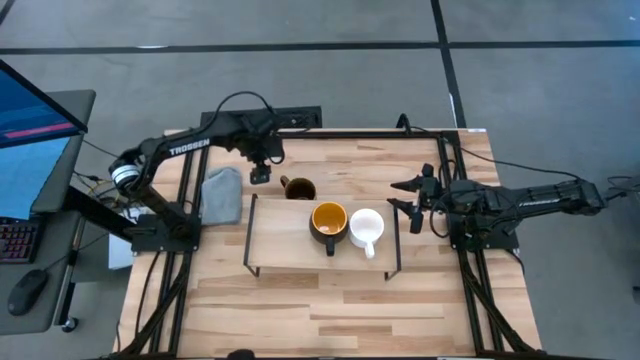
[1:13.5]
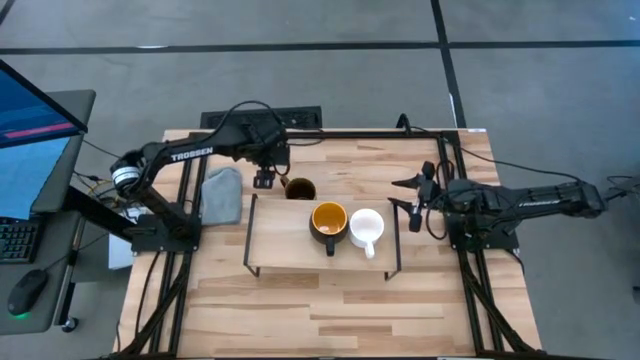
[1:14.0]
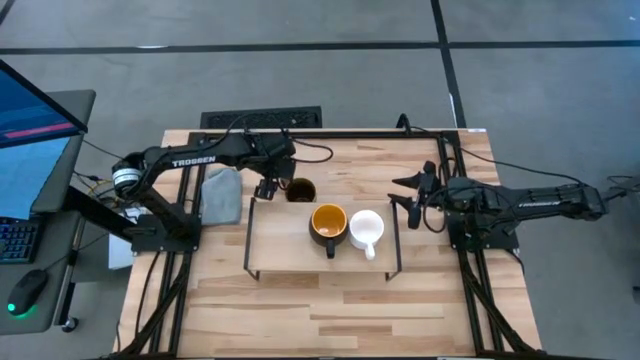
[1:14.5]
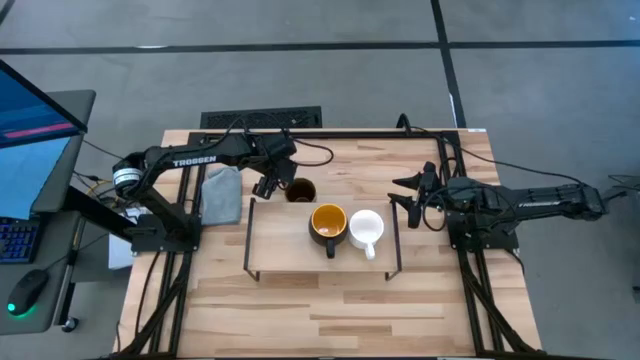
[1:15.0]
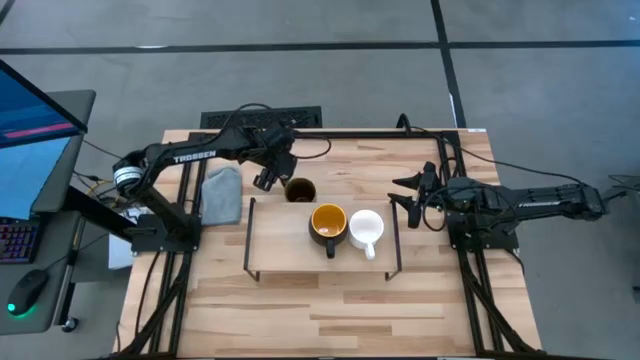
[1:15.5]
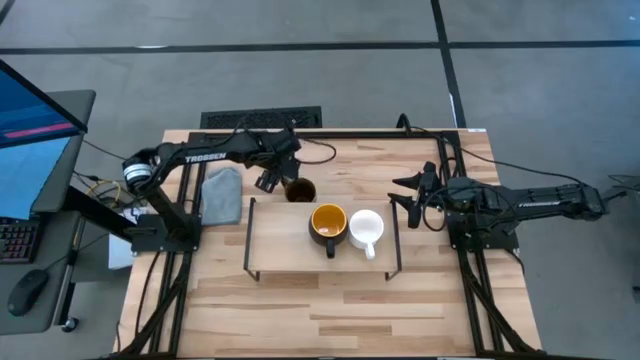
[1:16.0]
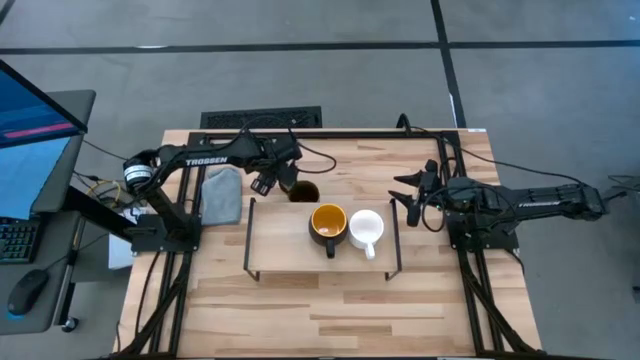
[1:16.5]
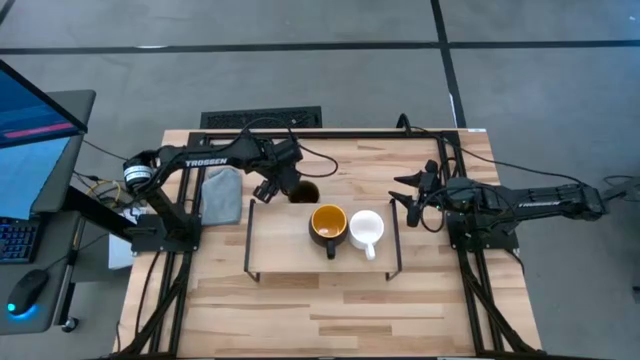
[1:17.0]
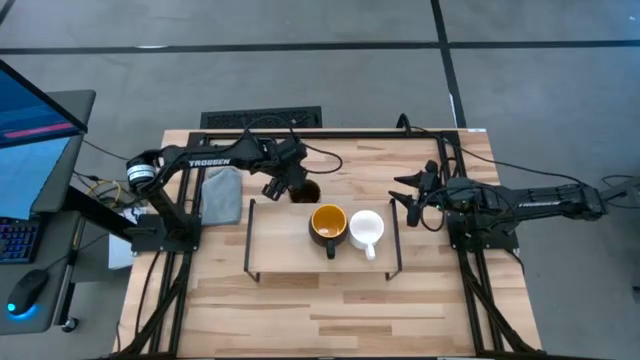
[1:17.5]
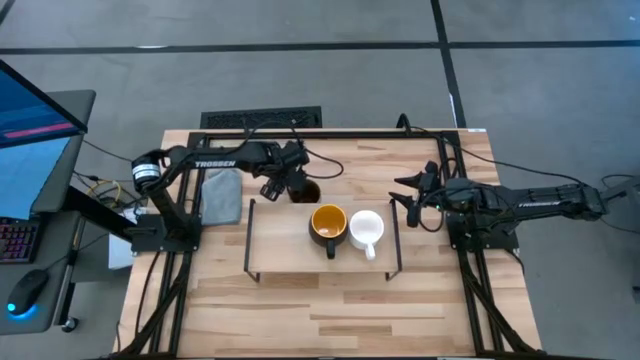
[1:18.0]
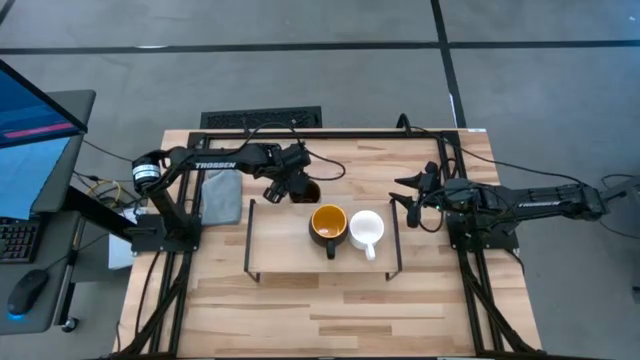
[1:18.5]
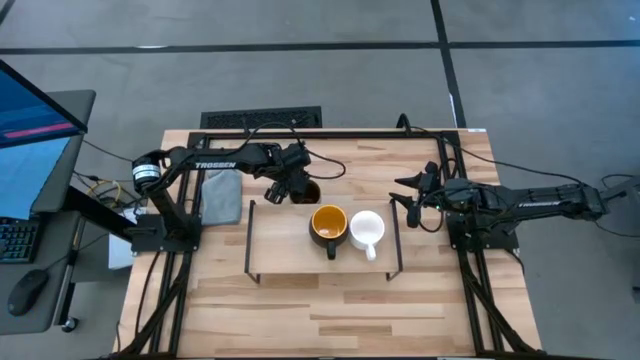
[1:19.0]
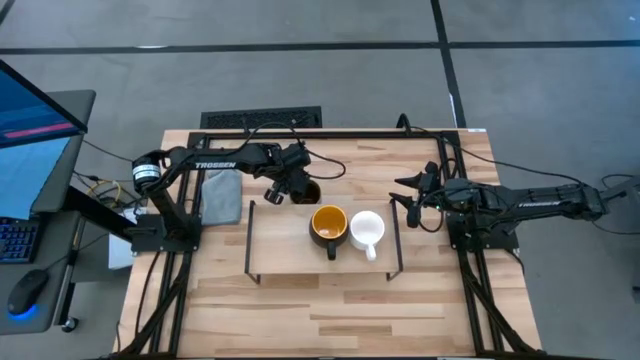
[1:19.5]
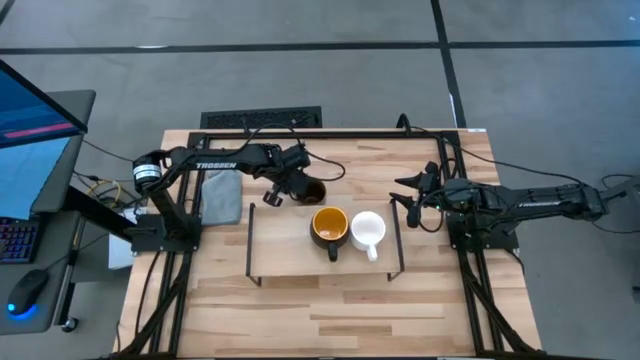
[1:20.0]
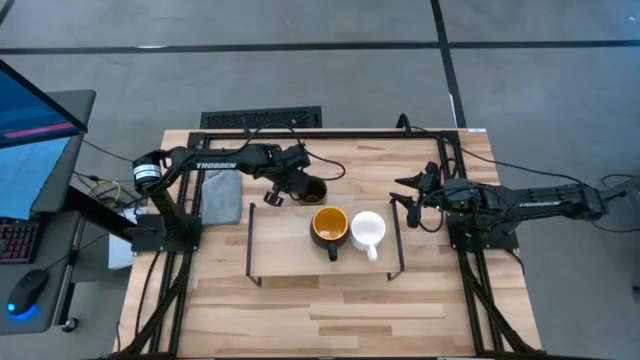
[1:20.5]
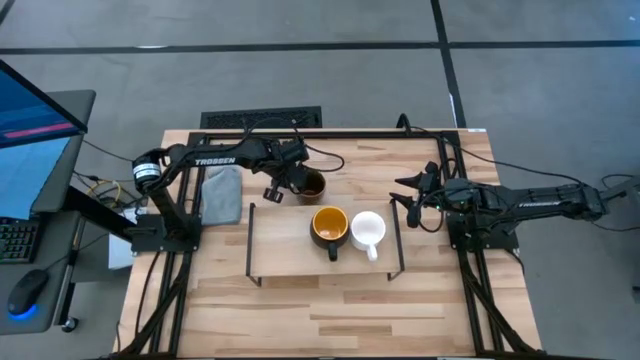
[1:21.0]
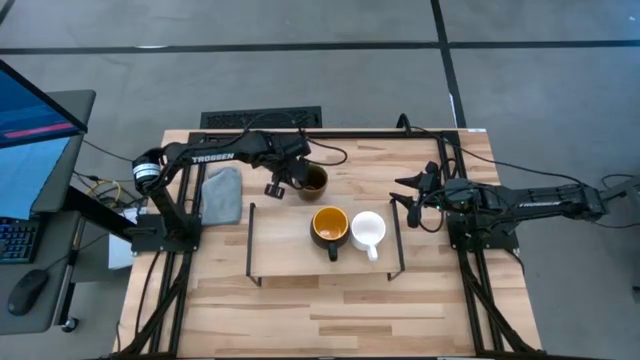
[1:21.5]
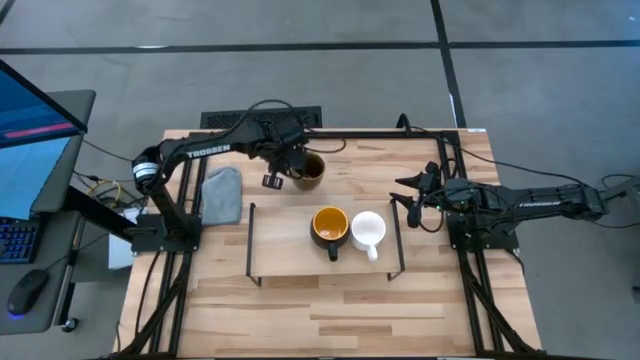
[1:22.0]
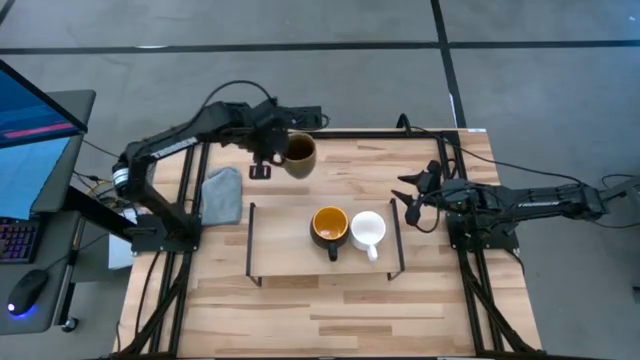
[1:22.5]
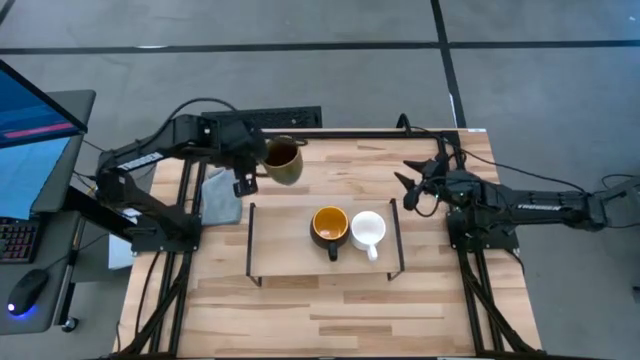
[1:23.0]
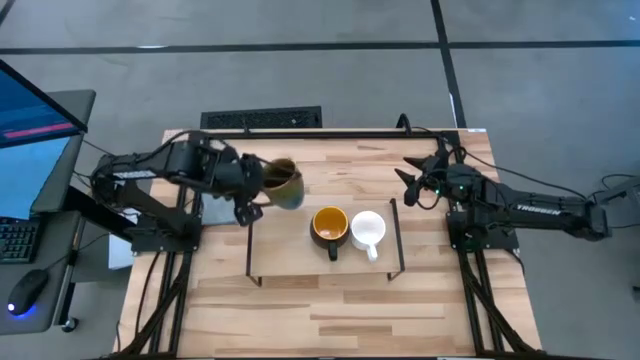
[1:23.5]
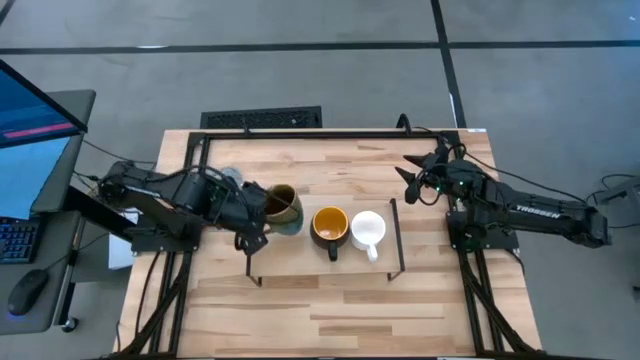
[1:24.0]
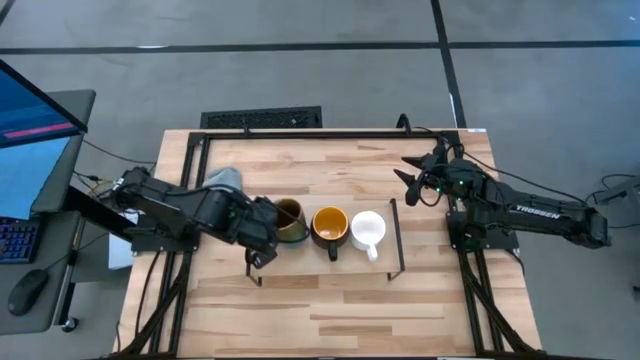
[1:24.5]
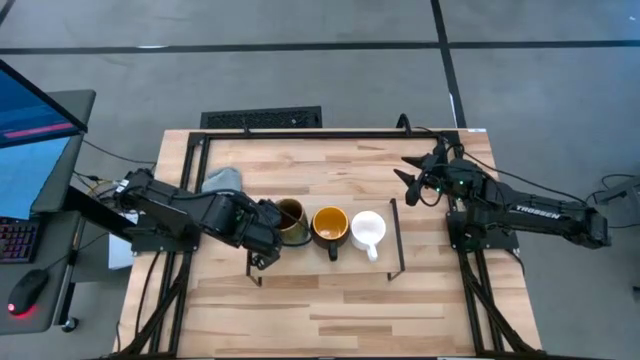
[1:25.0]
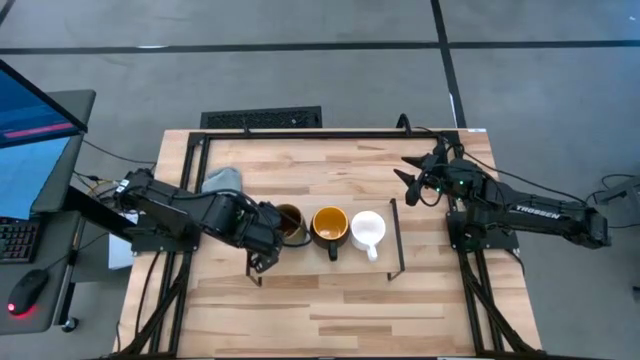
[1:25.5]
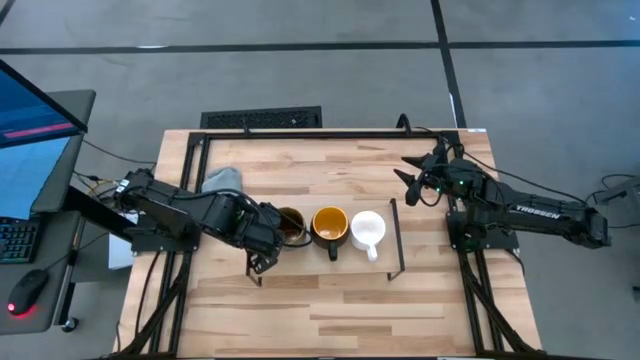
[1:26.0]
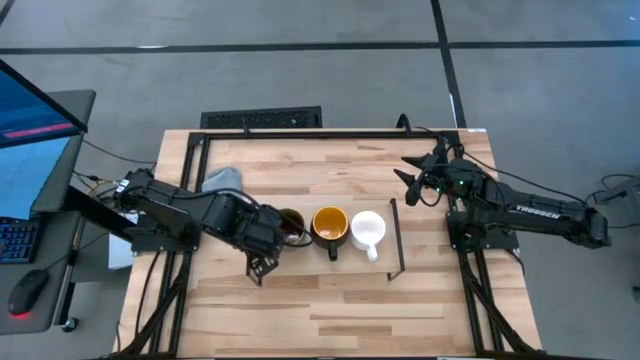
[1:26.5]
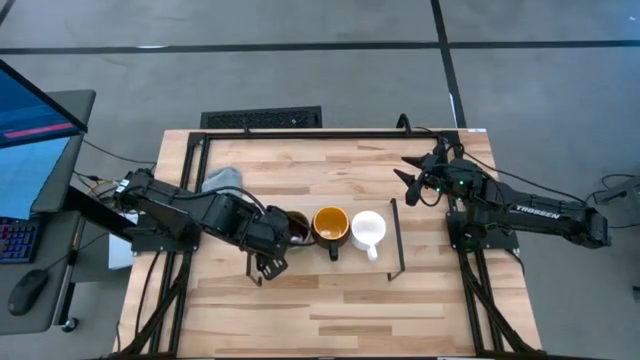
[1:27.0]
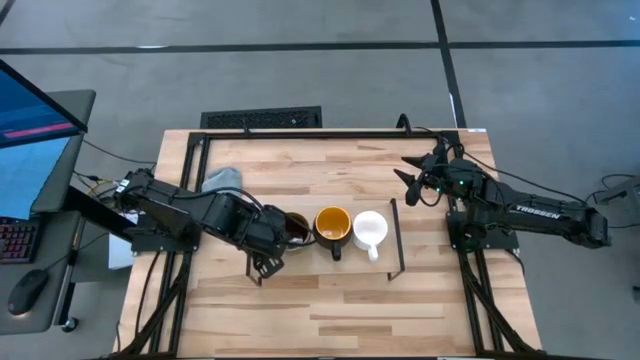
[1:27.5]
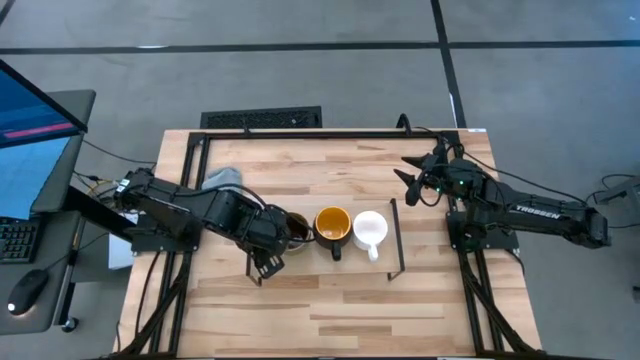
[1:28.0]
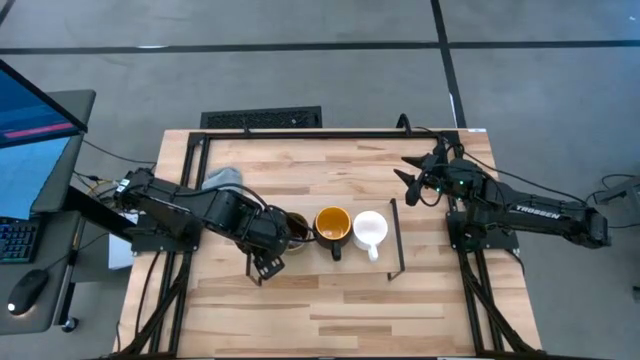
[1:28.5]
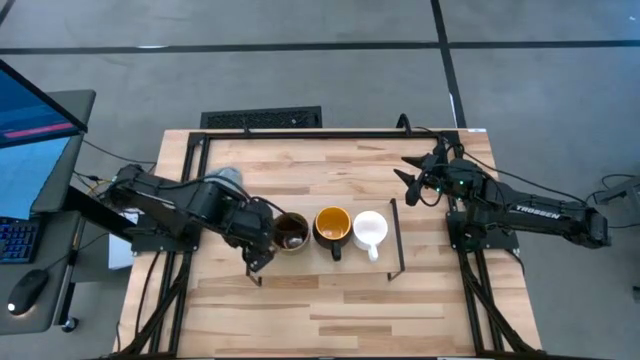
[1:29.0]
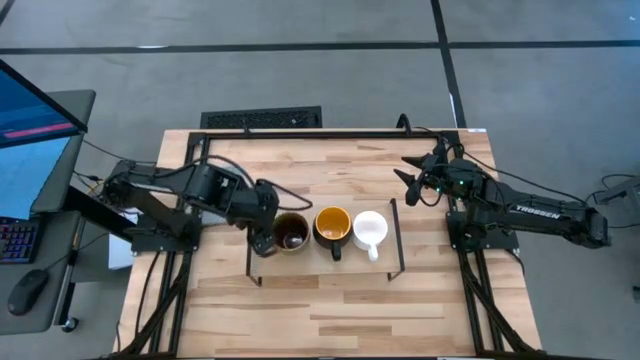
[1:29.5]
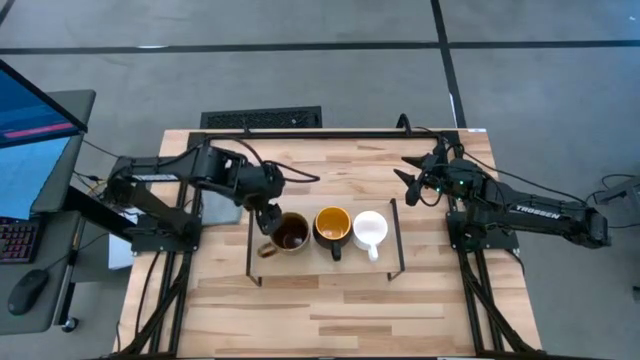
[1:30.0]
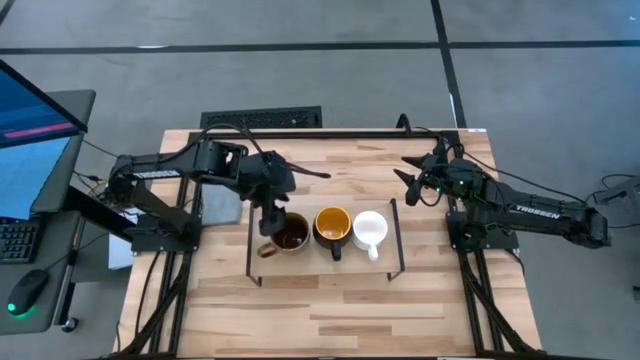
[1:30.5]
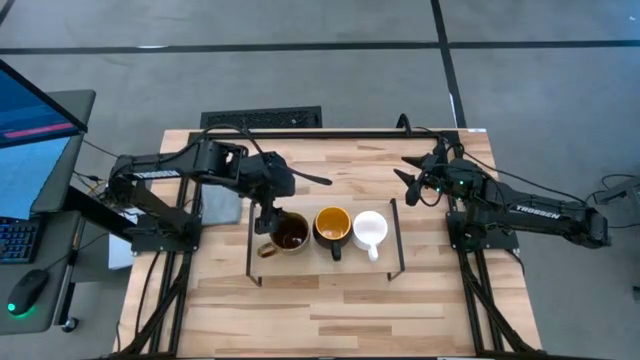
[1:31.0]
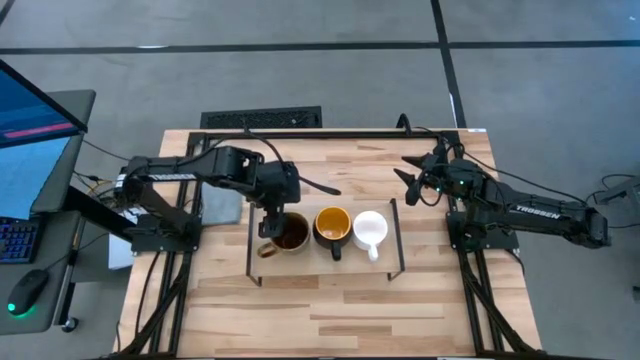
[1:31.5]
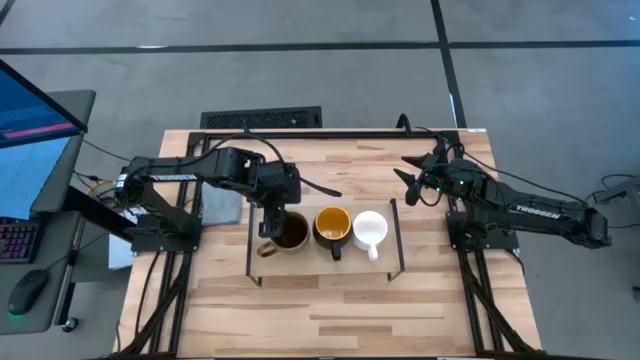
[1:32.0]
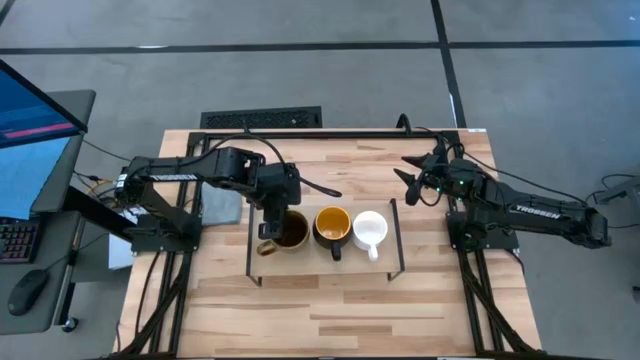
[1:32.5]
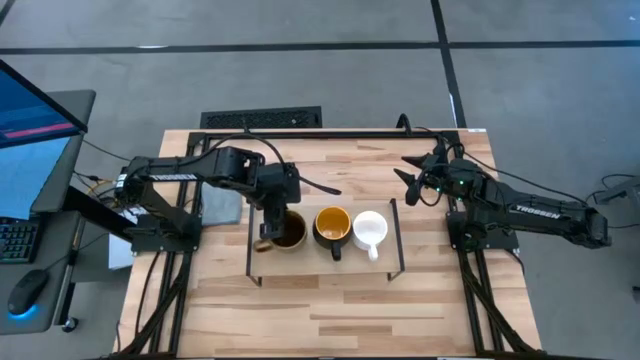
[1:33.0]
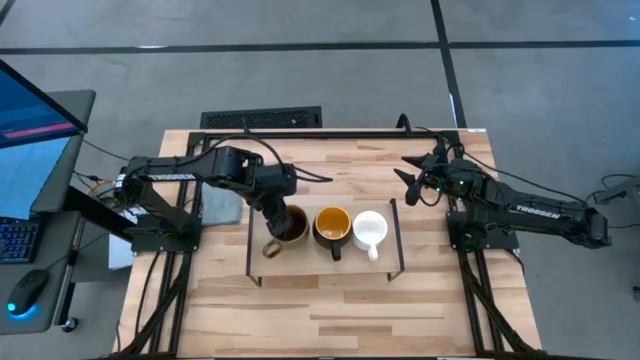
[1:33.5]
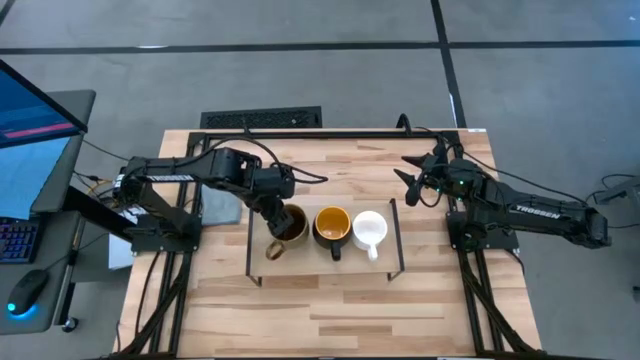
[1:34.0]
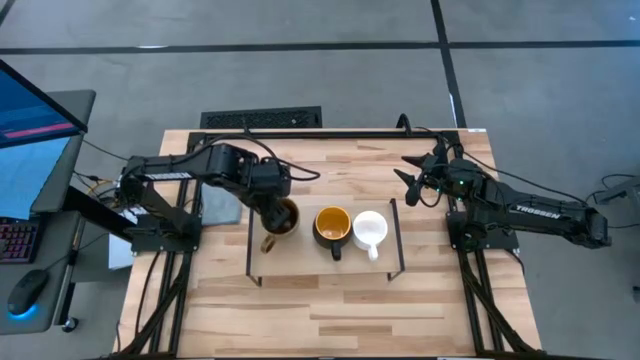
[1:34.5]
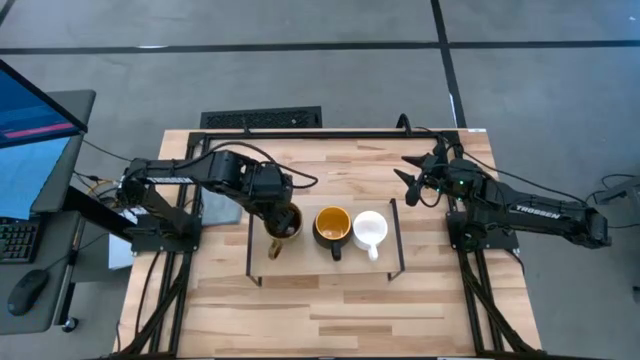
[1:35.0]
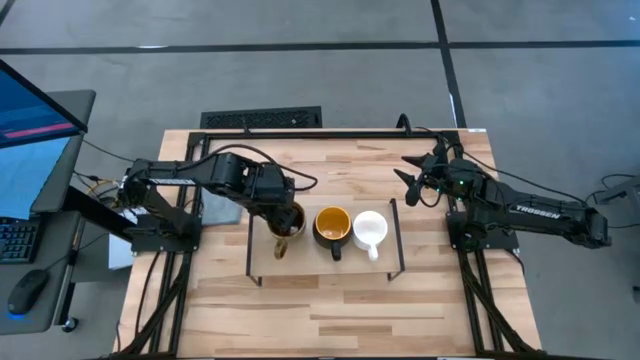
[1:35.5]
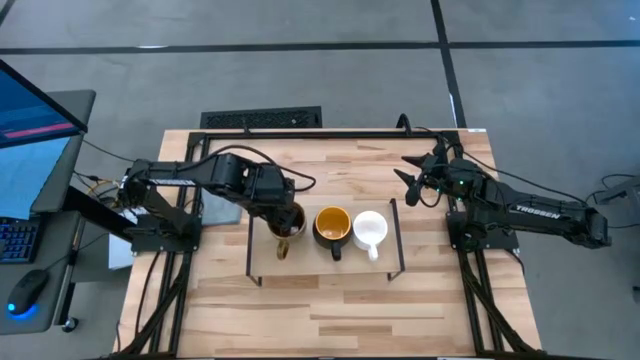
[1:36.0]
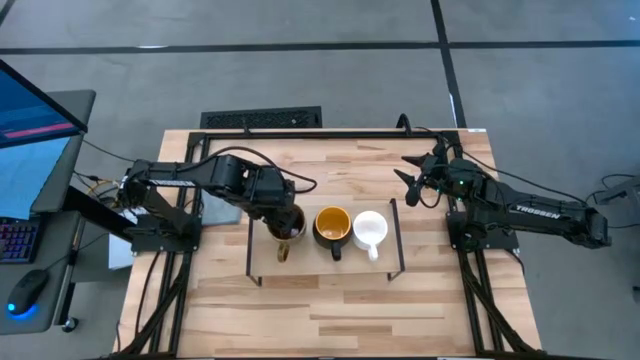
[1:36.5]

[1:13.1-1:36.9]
Task: Stack small to large cups/mugs on shelf
Put the brown mug on the shelf
